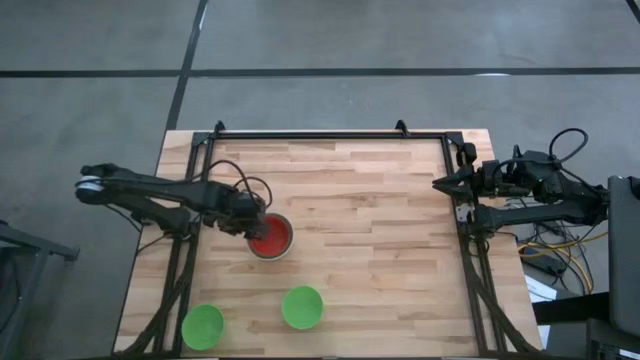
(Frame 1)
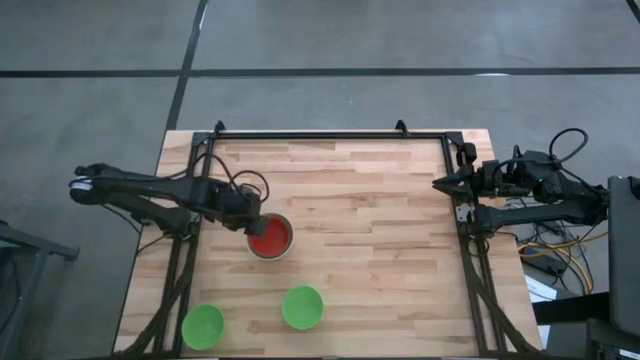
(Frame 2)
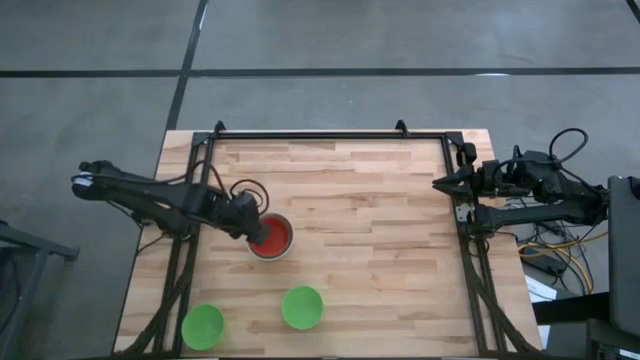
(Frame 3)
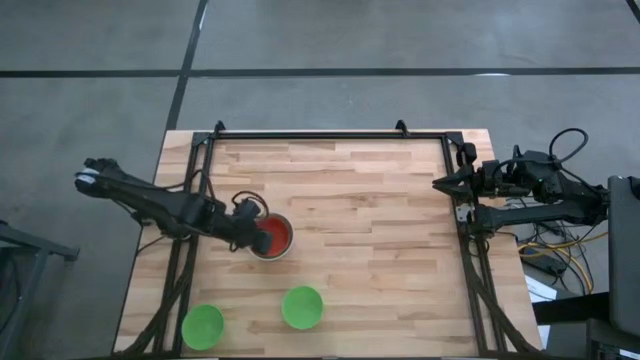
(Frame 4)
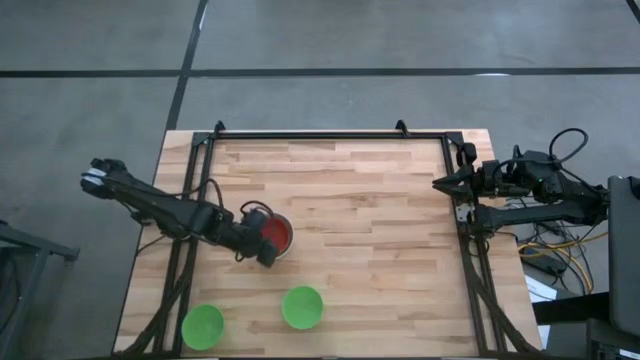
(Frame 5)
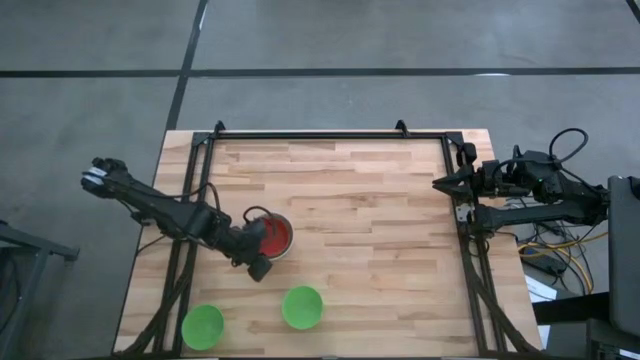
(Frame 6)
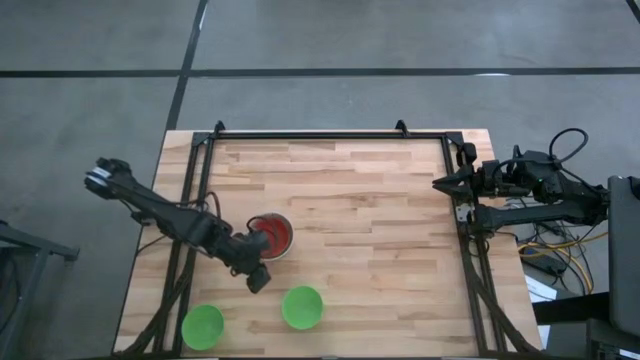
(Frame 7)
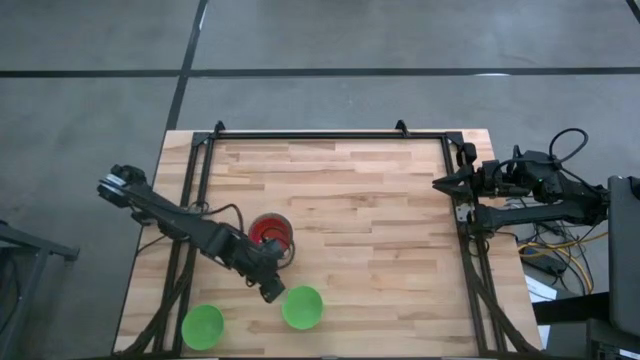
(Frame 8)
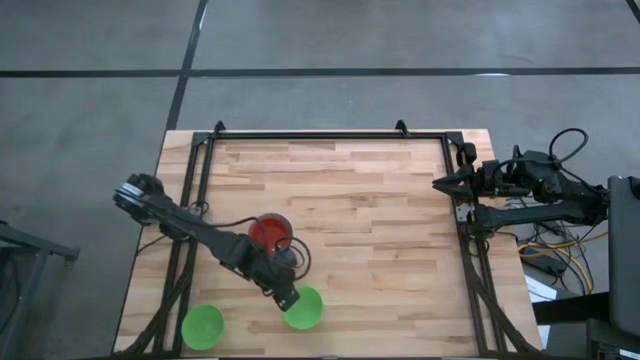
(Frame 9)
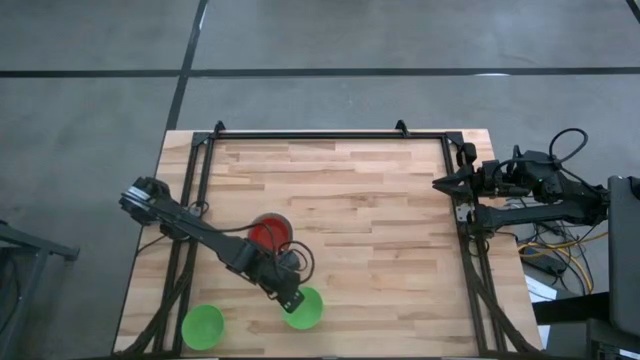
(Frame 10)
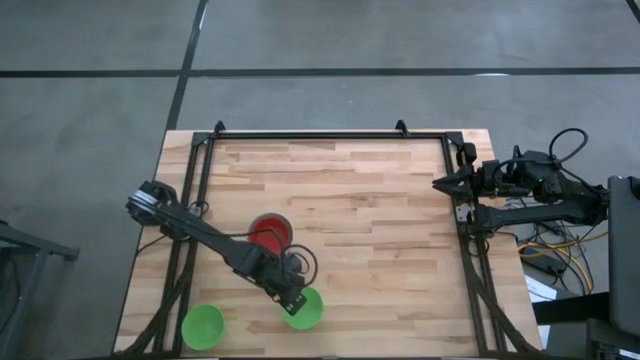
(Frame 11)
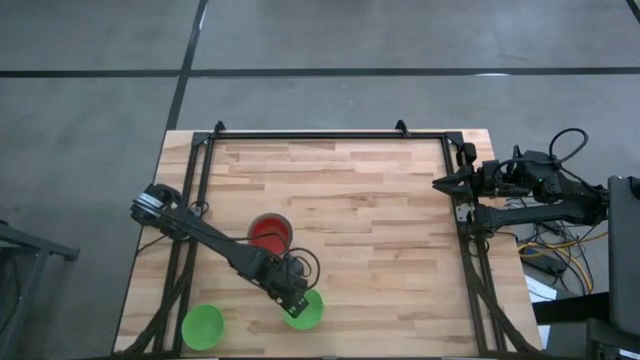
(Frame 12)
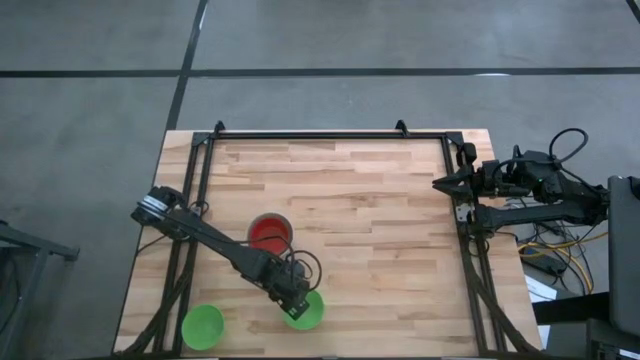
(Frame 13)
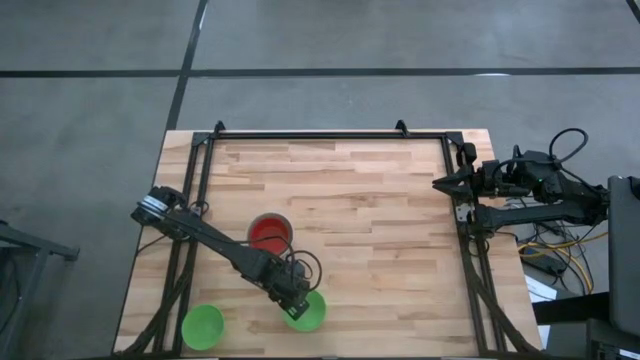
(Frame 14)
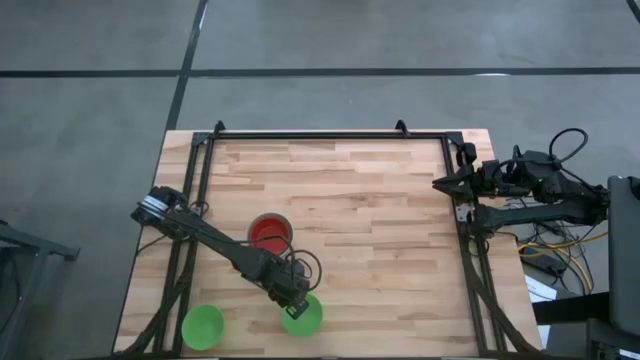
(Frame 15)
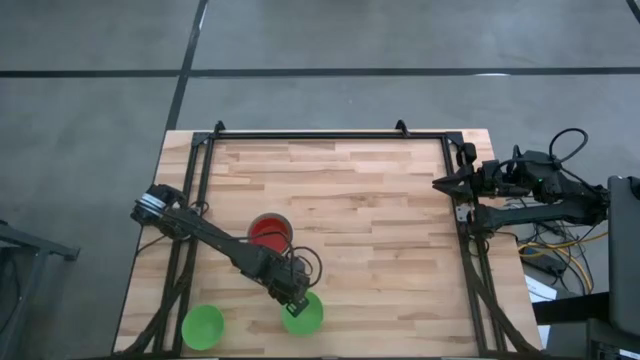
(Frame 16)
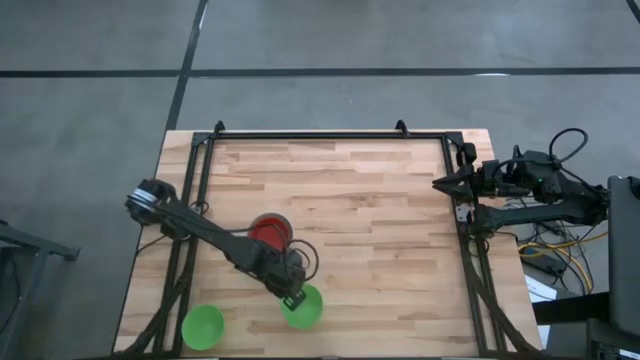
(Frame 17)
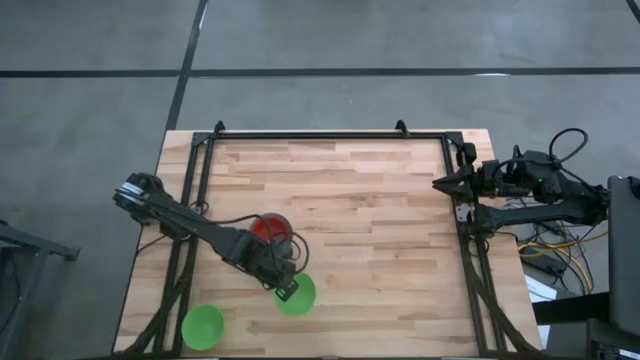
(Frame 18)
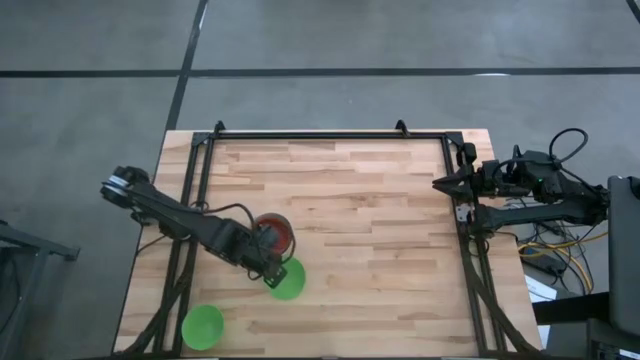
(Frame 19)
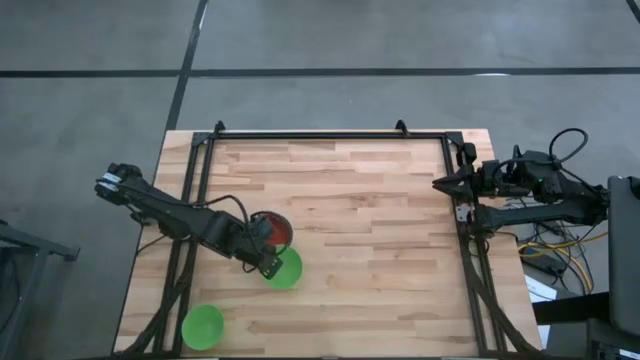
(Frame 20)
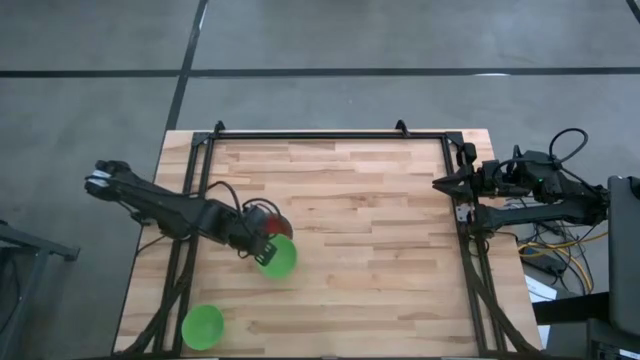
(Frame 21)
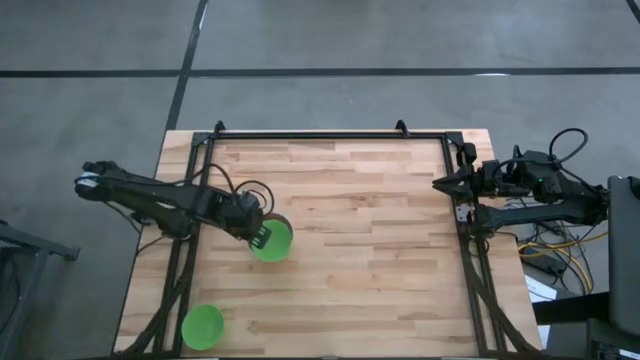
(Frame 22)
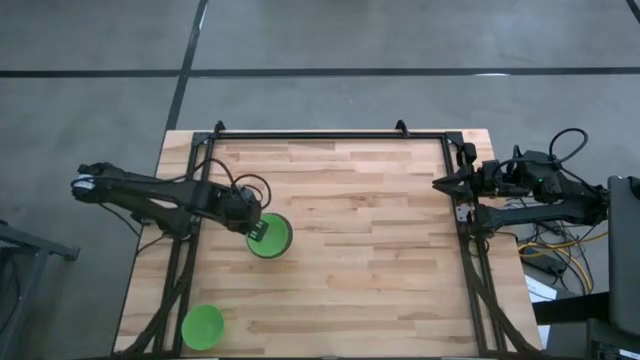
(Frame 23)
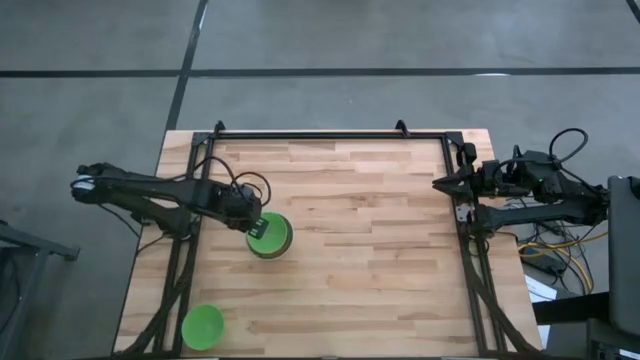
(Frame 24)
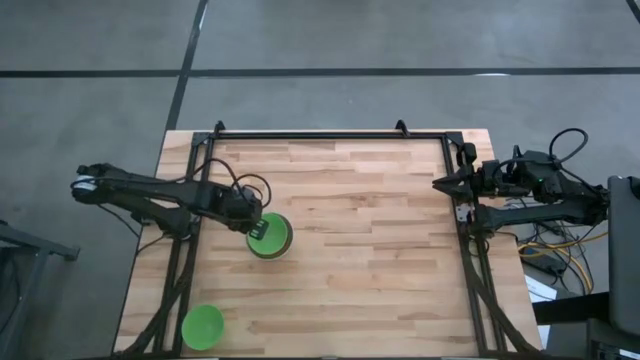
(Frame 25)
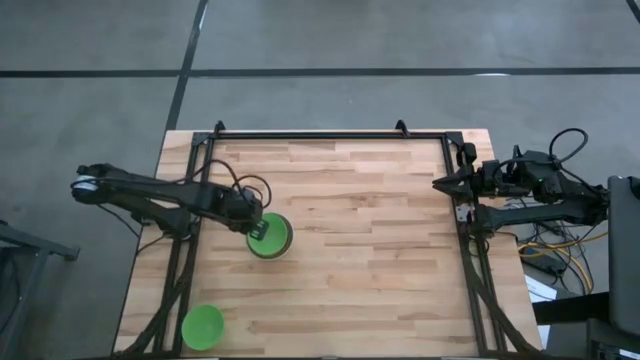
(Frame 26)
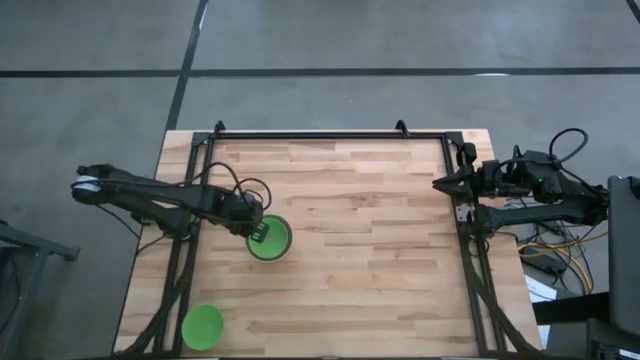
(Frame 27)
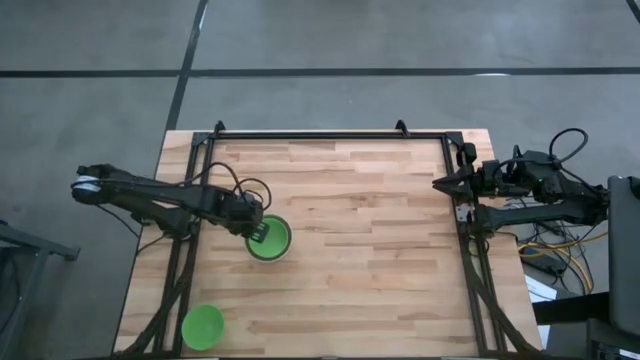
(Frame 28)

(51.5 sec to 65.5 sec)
Stack the right green bowl on top of the green bowl
